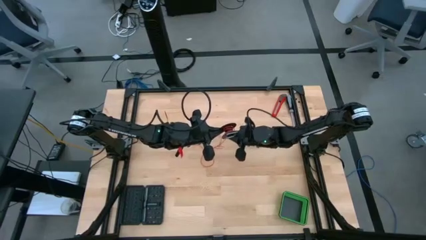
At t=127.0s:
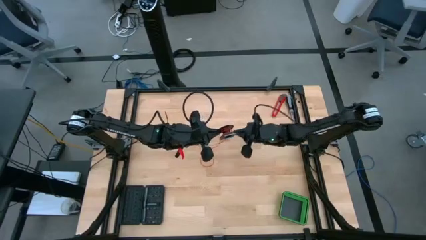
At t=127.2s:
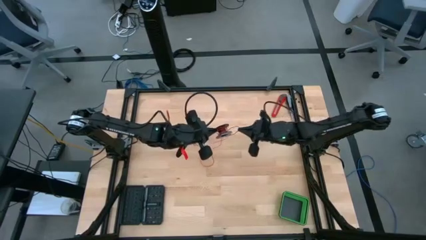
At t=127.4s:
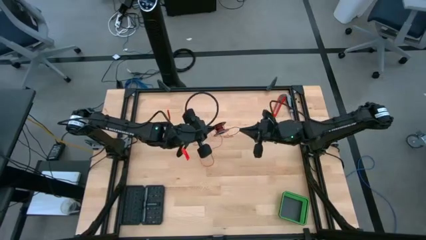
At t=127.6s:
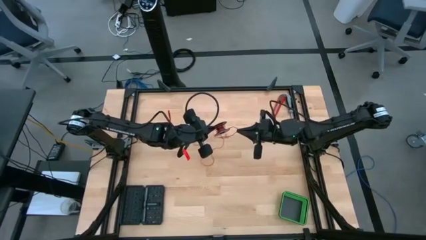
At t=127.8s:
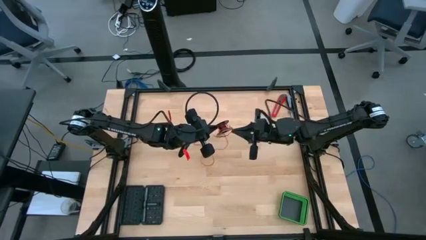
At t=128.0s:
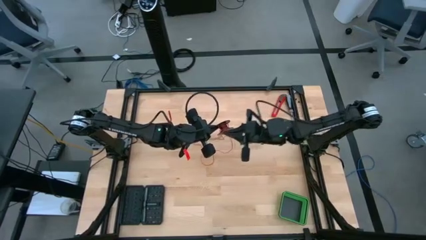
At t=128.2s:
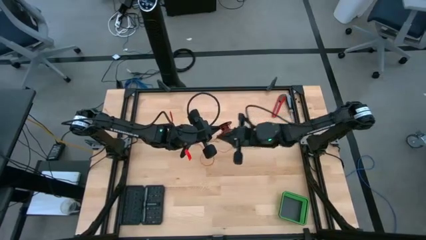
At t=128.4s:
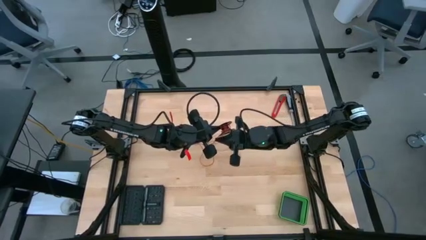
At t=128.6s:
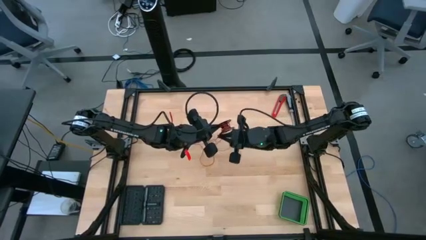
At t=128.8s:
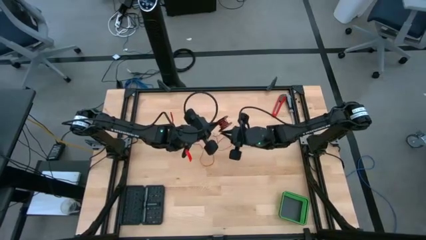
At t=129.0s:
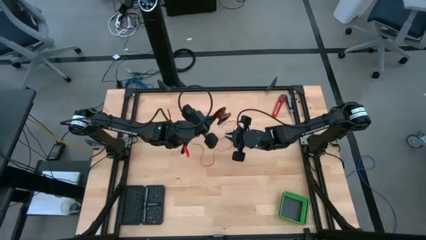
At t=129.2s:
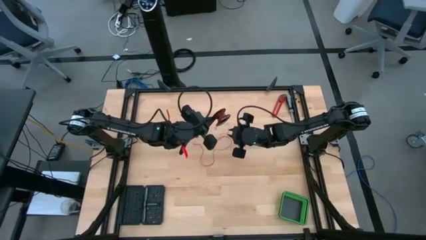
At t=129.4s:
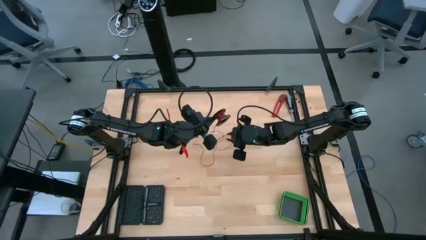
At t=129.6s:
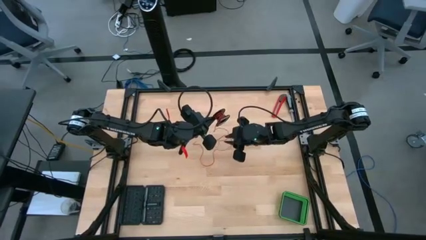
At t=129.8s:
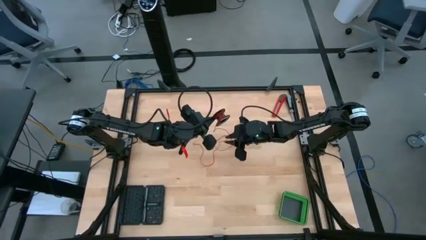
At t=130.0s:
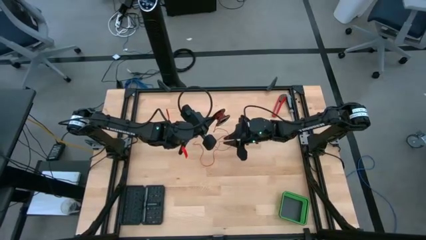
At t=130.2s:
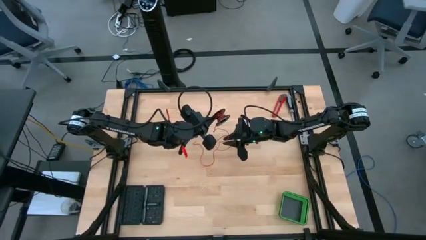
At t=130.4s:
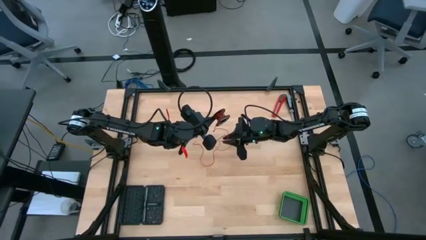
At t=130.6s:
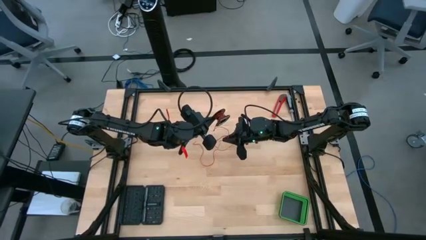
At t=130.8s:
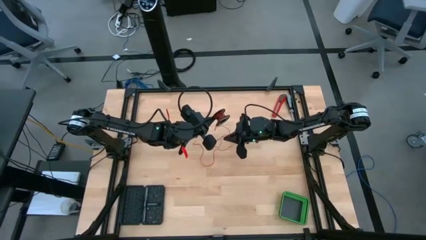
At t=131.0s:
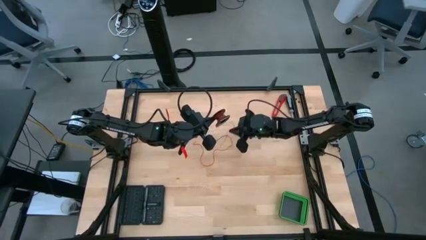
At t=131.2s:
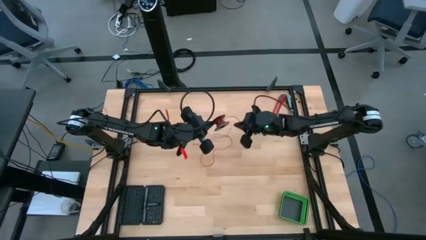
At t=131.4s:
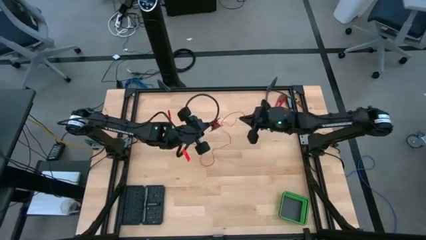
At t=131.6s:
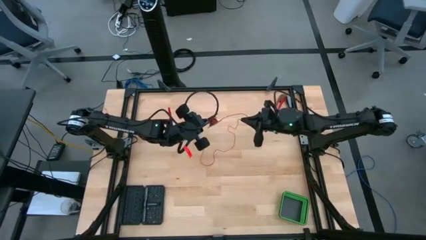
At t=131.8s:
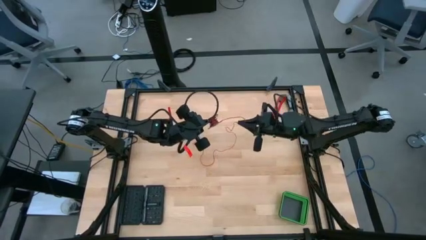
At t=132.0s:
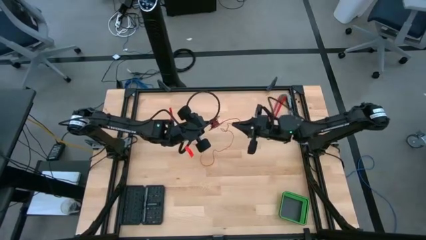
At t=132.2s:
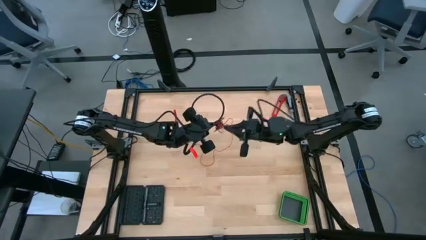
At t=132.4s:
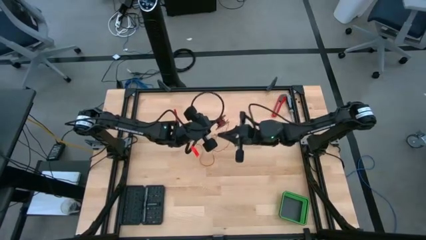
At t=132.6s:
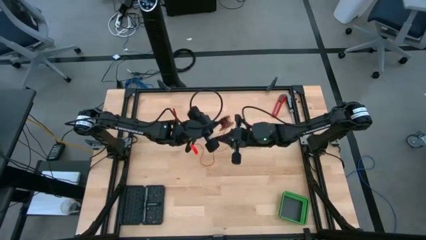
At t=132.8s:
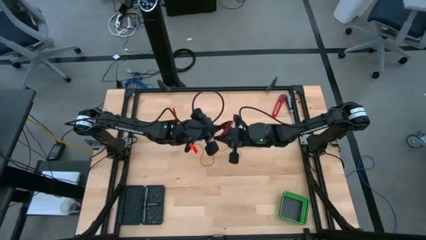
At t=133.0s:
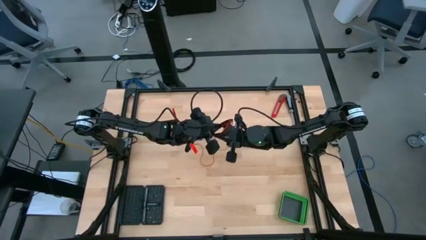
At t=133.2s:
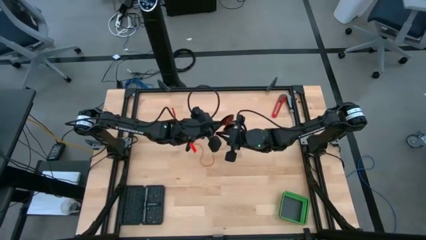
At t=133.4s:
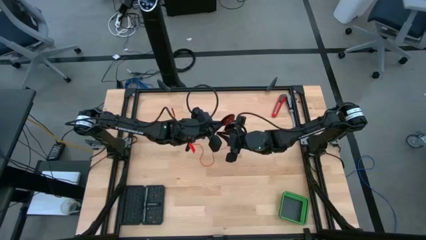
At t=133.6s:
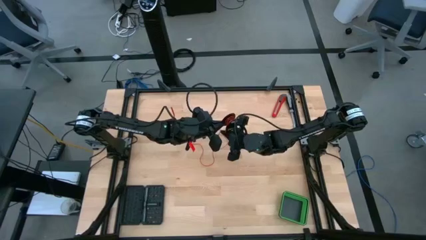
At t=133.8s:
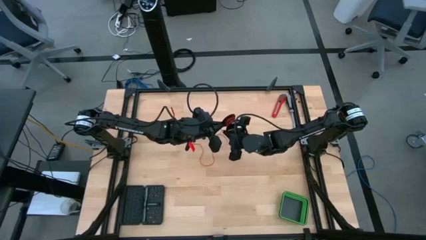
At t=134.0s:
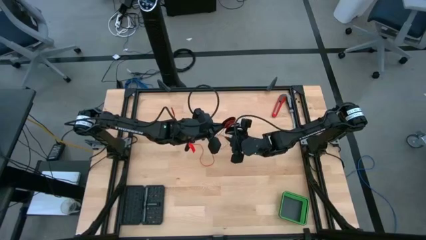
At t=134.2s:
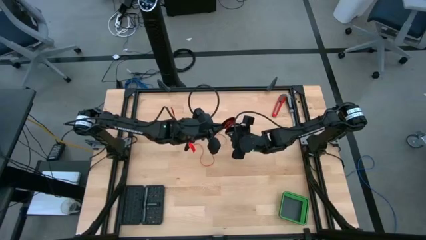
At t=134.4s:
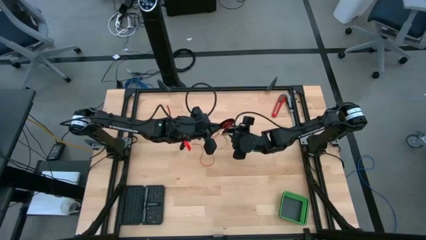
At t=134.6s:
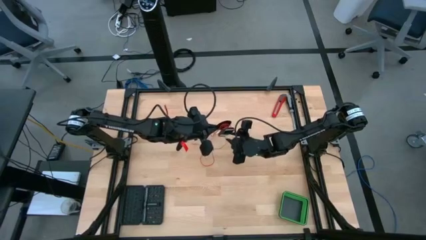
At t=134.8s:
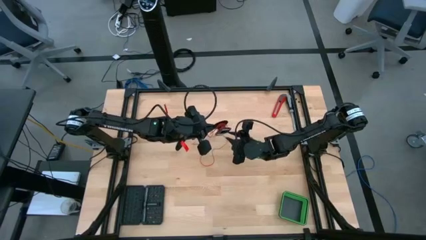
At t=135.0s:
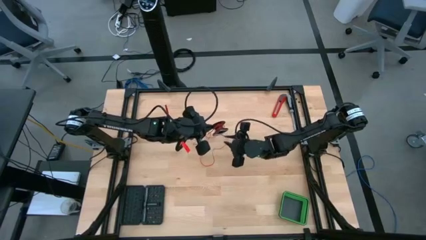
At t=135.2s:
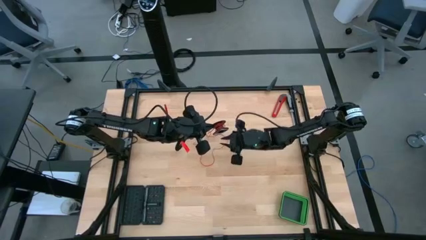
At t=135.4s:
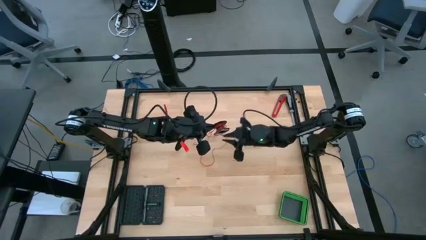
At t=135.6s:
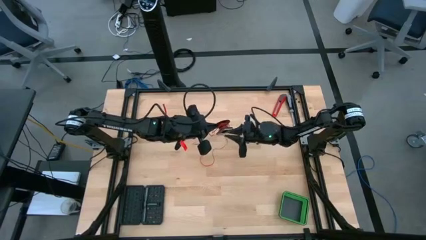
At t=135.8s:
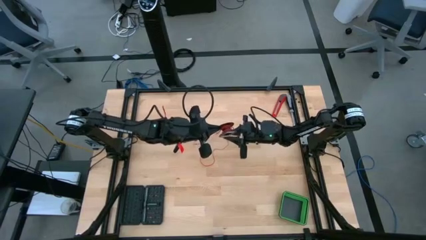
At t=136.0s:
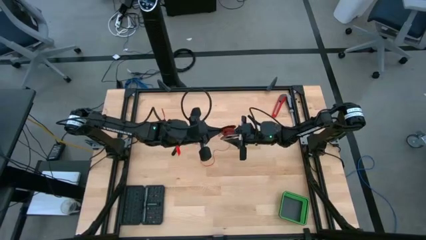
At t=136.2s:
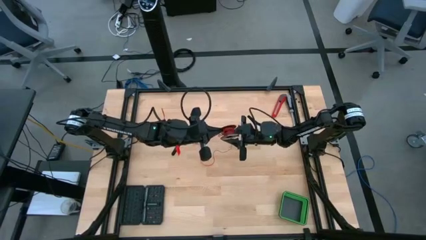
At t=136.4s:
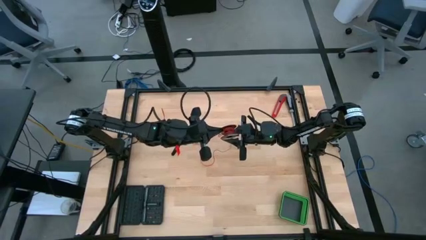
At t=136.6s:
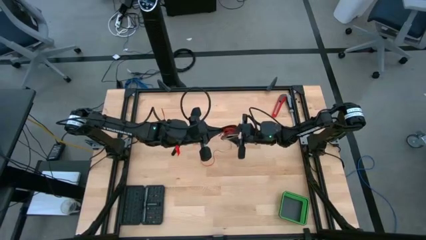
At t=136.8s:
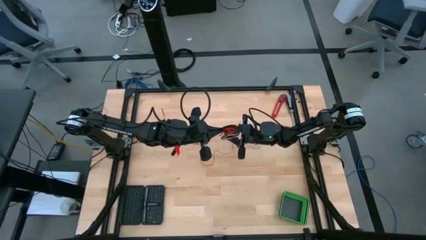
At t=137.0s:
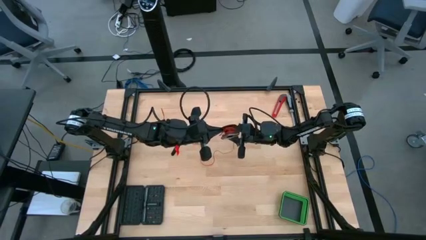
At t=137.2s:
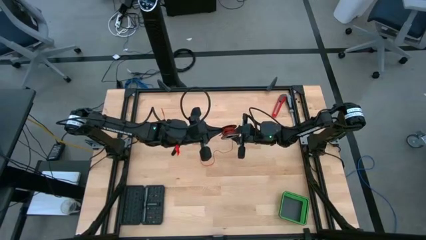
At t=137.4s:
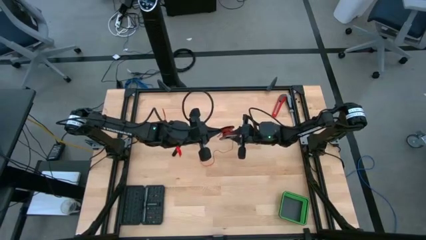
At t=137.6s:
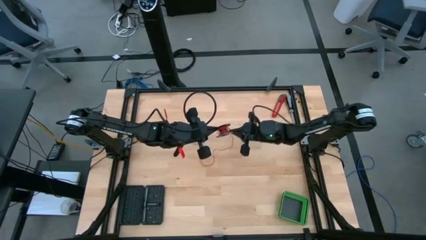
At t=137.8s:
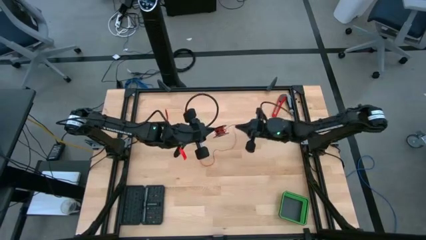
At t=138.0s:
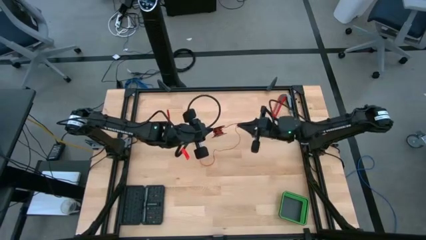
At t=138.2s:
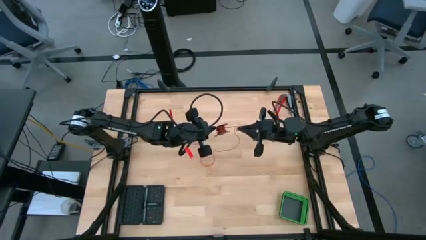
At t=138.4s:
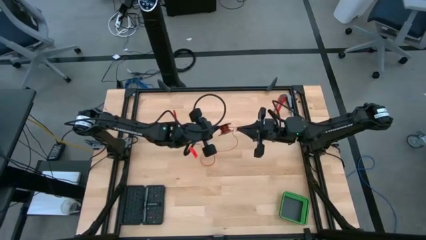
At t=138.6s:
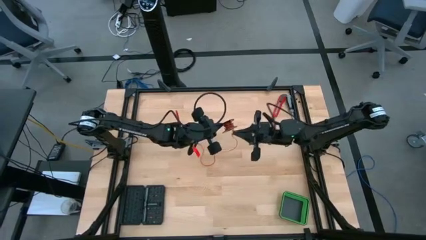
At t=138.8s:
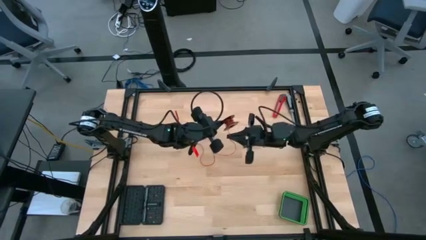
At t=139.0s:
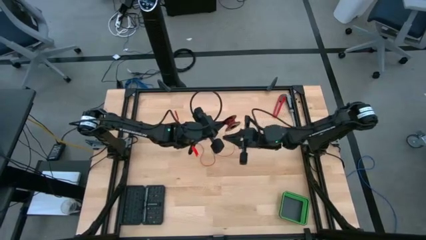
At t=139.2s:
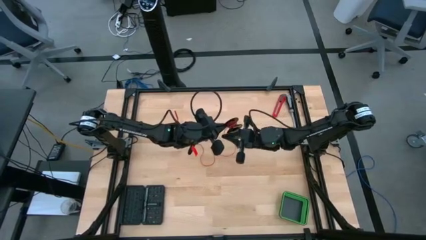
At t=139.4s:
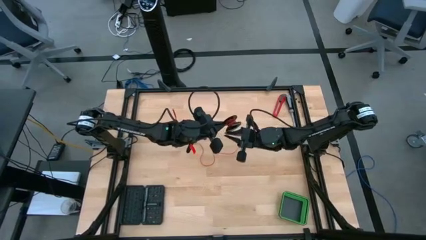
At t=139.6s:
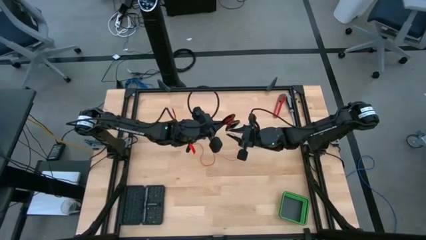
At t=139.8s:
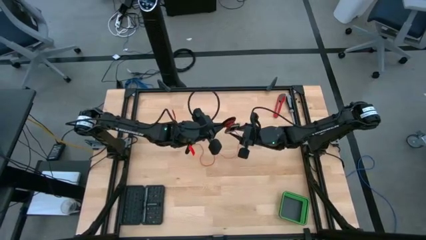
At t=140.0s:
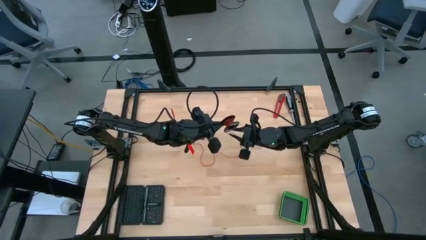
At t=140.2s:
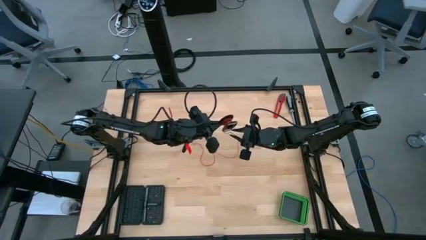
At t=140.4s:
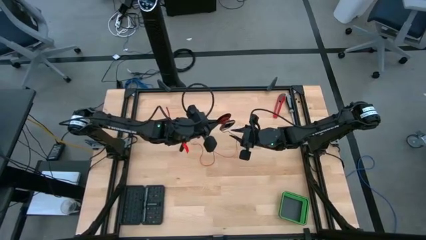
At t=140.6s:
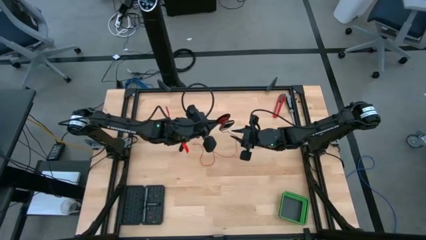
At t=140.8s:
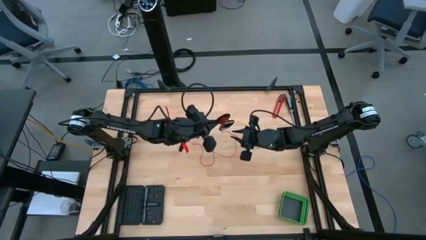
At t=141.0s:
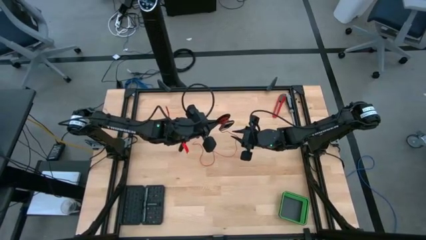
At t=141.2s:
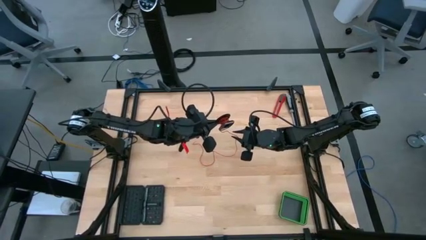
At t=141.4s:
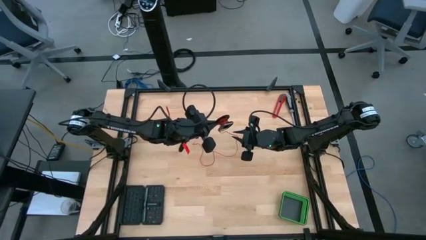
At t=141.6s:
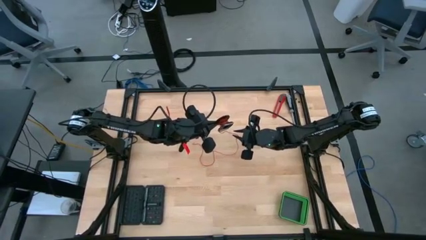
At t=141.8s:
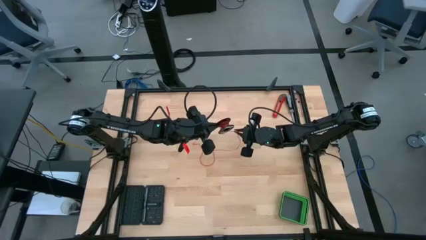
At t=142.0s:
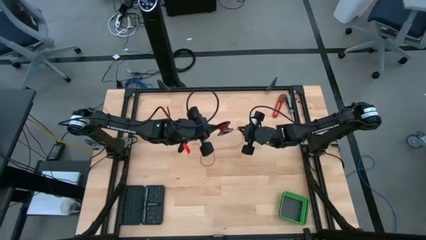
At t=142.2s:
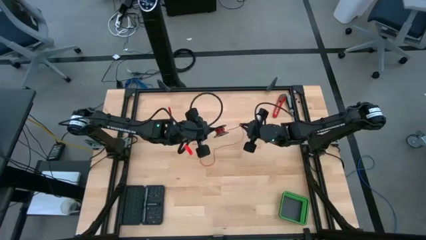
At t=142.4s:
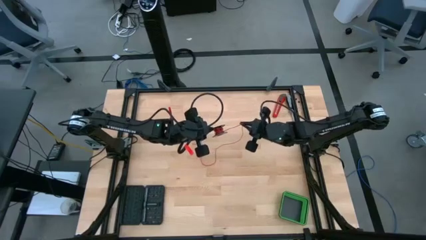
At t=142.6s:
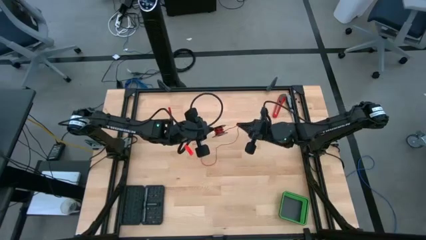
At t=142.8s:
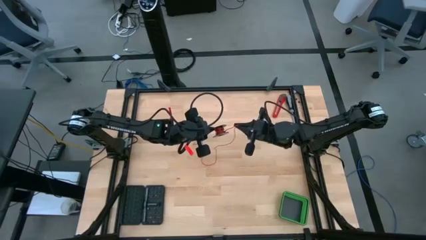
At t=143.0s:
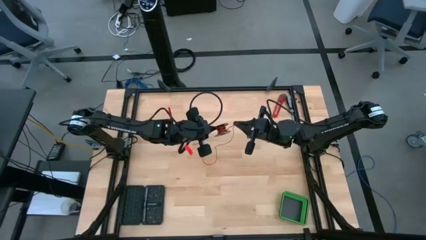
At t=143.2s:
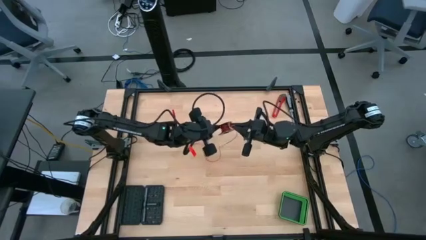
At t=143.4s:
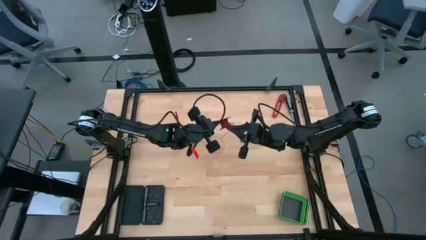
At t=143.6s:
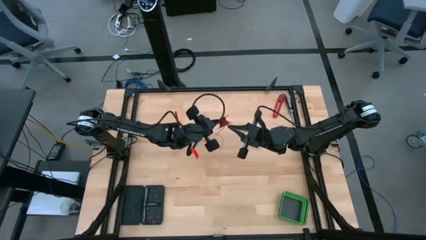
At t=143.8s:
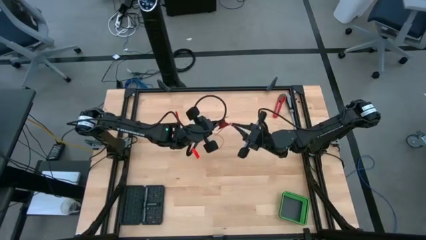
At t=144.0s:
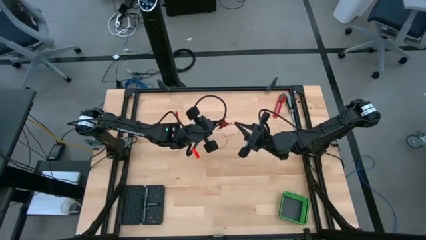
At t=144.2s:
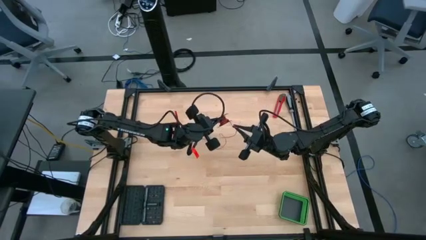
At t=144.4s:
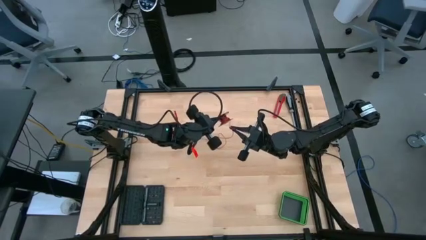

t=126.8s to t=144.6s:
Task: Coil cords
Coil the red wire onto the black spool
